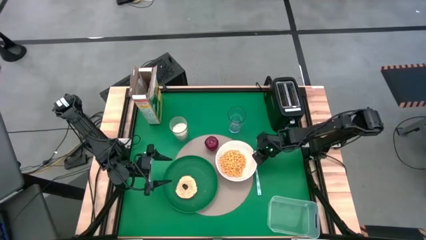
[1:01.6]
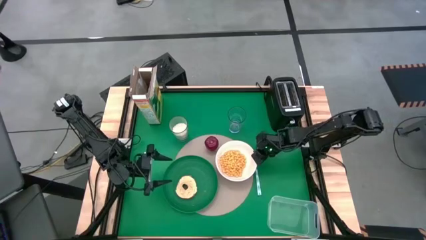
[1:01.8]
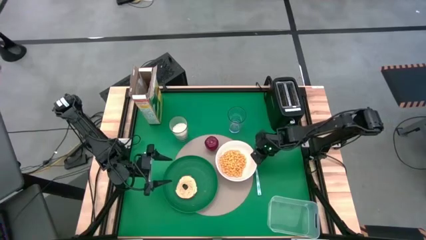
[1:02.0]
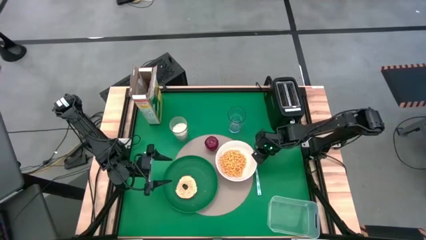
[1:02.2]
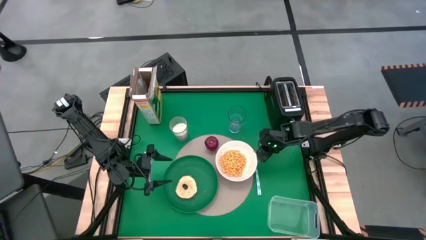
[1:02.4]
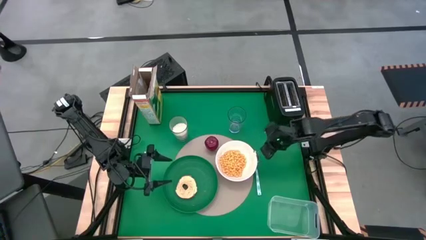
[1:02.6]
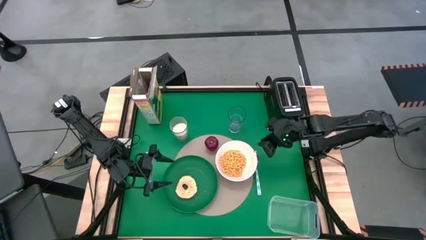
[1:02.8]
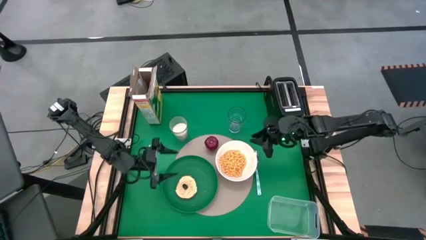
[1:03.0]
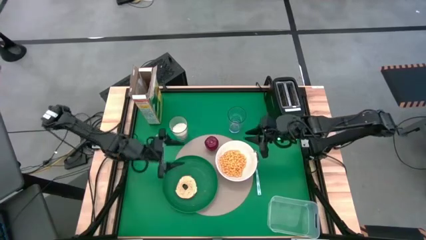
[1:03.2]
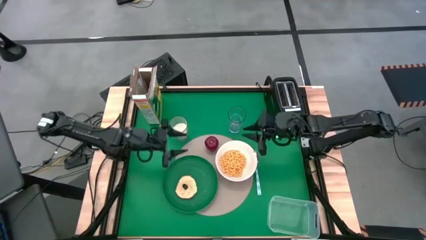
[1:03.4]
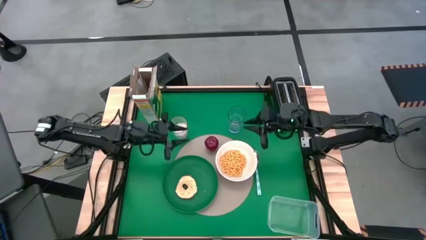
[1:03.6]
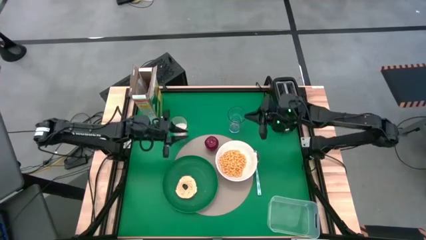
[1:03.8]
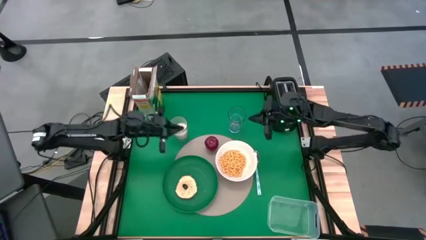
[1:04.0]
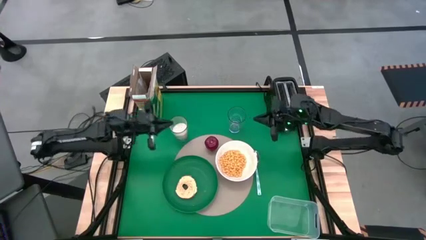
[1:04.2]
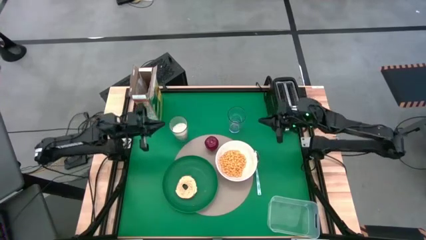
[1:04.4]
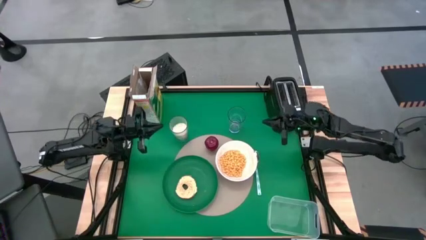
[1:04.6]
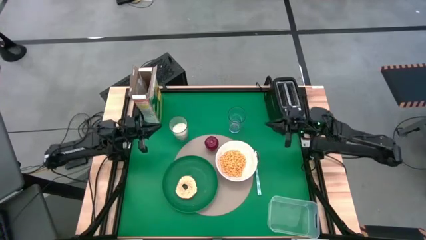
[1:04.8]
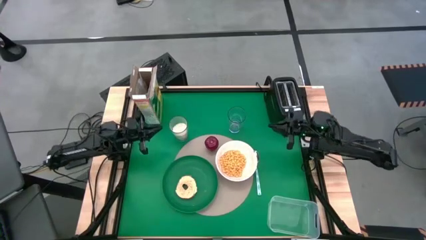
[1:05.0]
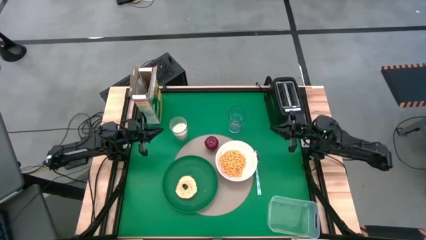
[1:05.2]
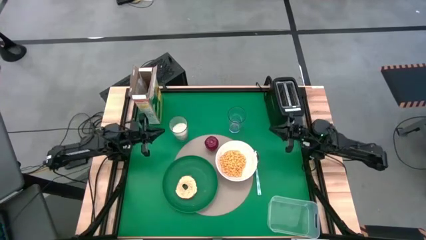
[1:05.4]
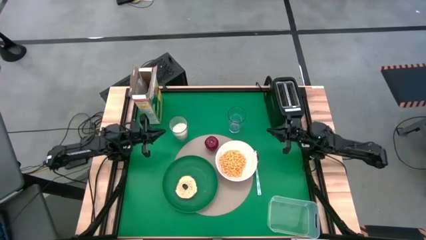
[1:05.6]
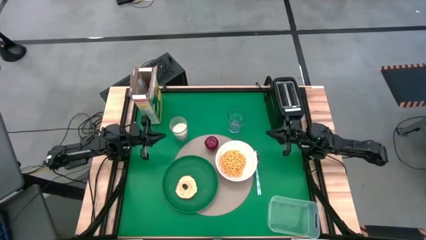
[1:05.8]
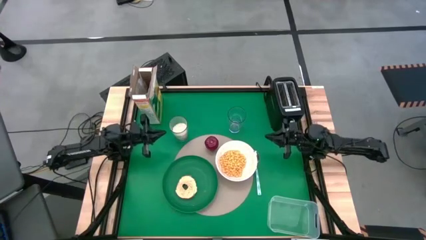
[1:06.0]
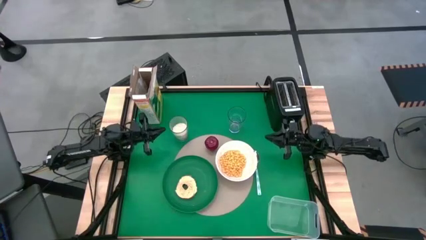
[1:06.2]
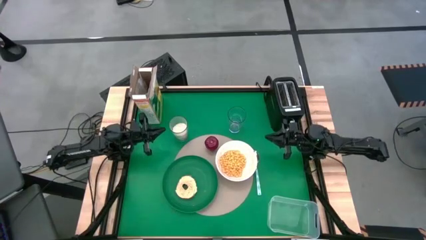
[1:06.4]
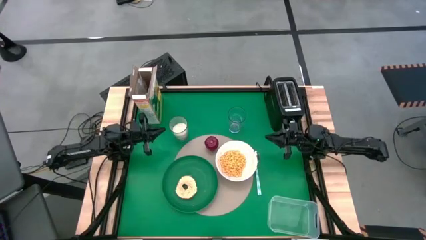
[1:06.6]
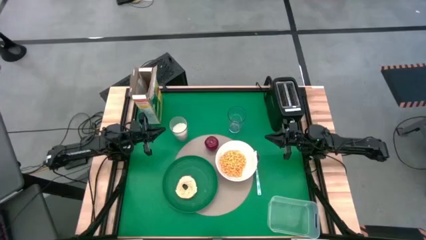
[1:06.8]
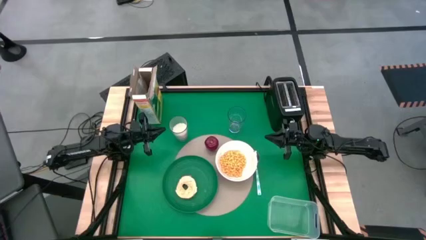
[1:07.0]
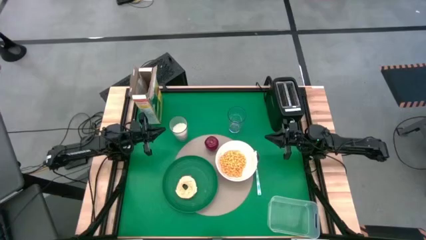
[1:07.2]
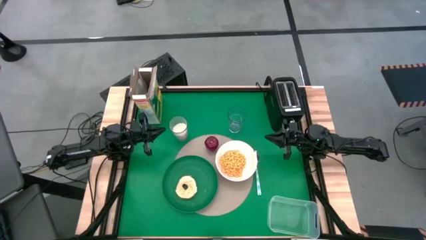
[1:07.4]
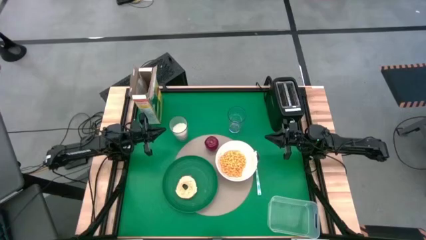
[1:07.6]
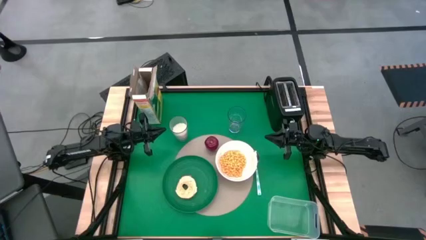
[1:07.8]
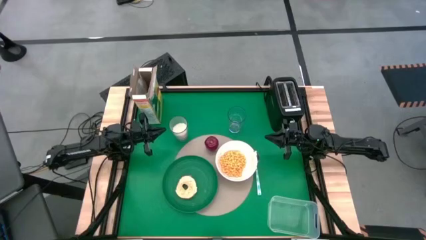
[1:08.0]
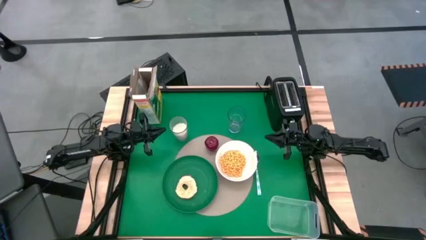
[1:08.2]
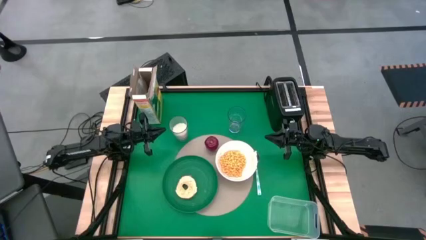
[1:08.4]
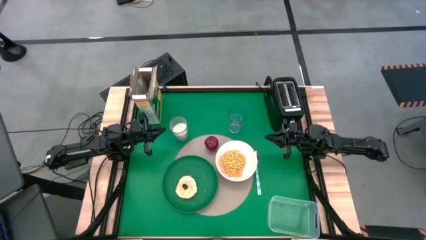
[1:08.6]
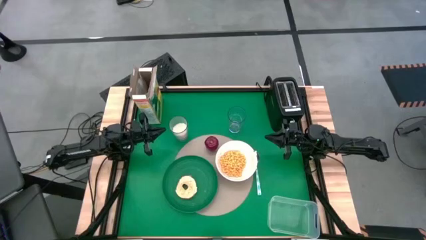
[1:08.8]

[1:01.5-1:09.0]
Task: Arrange a breakfast setting
Return to Home Position
